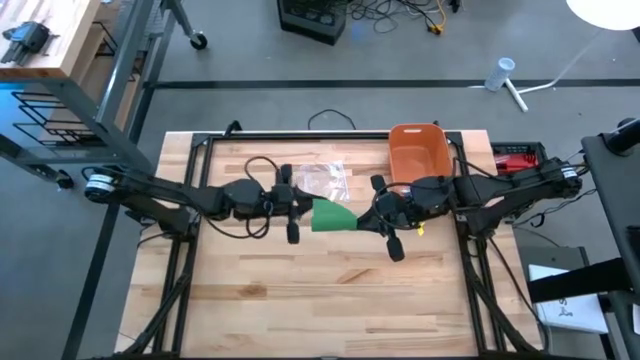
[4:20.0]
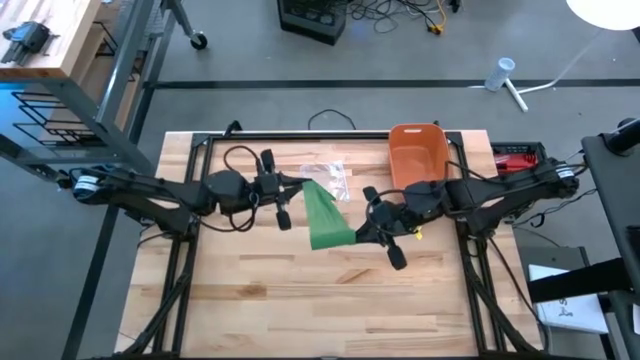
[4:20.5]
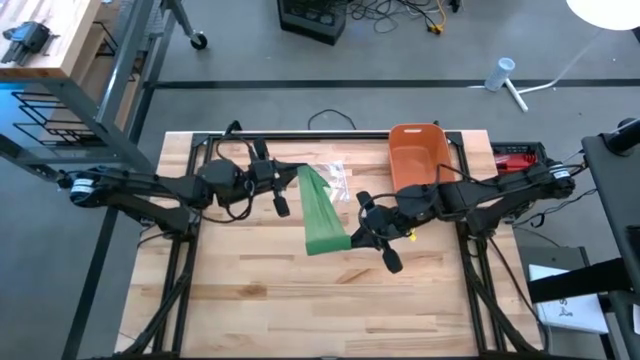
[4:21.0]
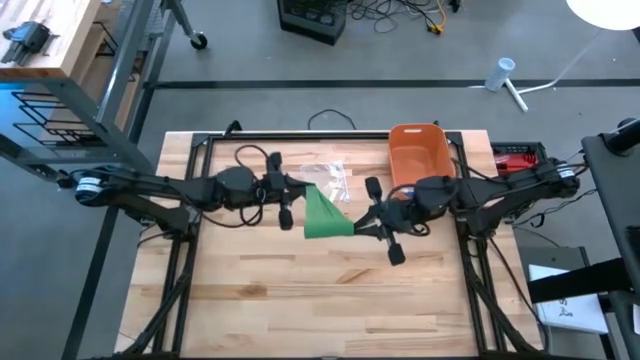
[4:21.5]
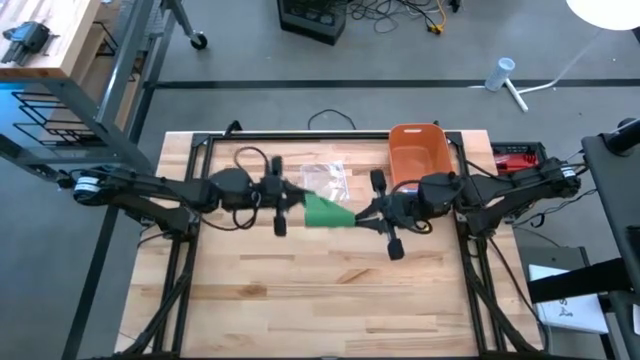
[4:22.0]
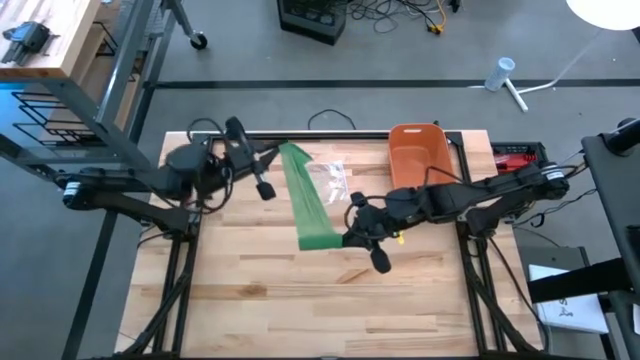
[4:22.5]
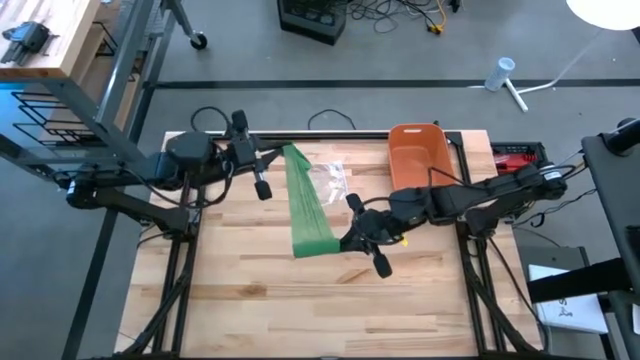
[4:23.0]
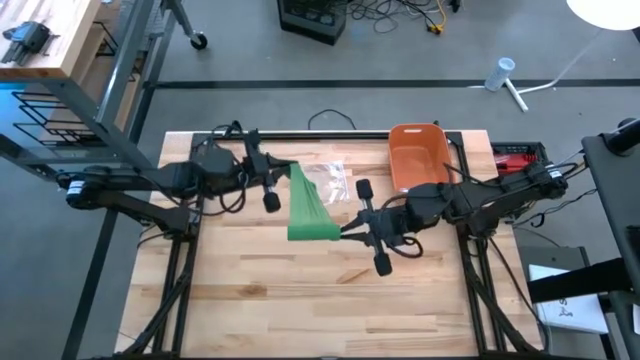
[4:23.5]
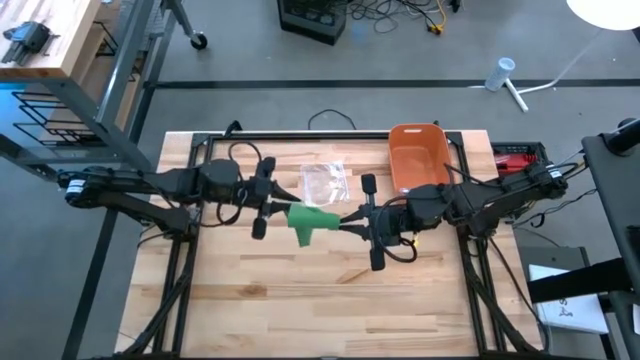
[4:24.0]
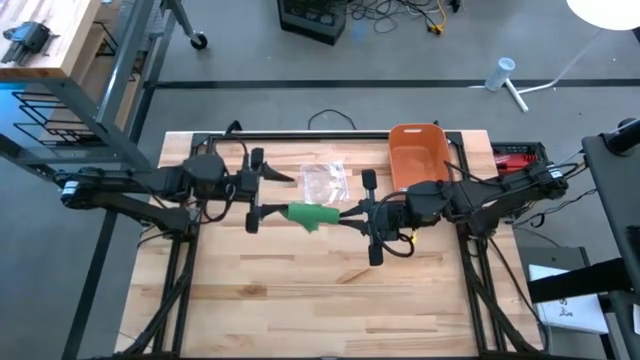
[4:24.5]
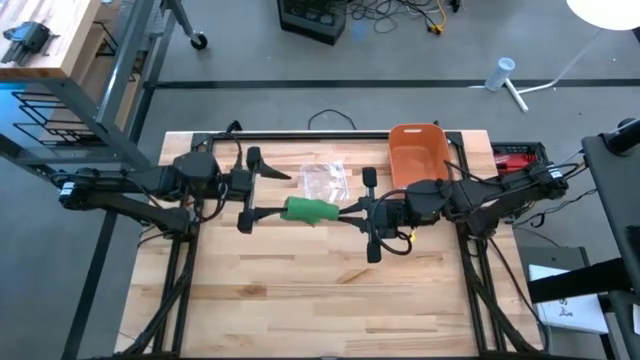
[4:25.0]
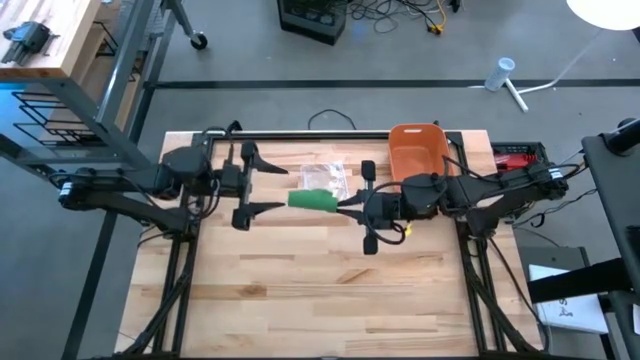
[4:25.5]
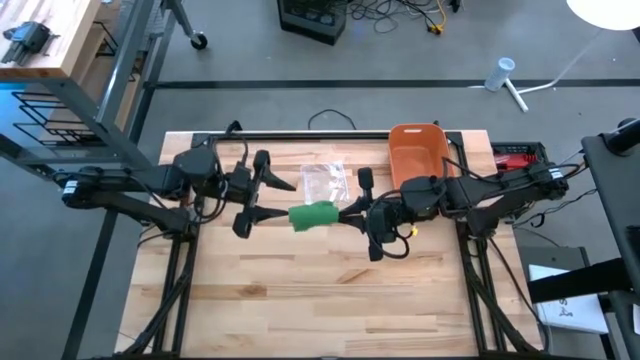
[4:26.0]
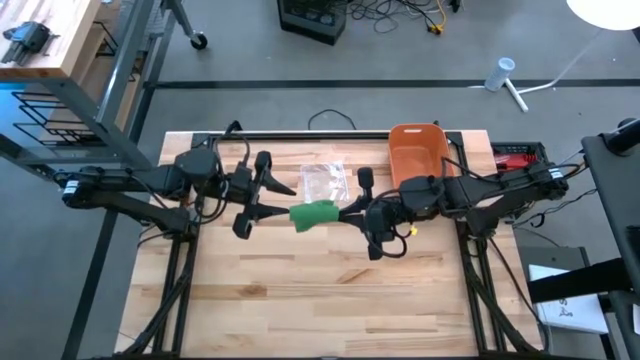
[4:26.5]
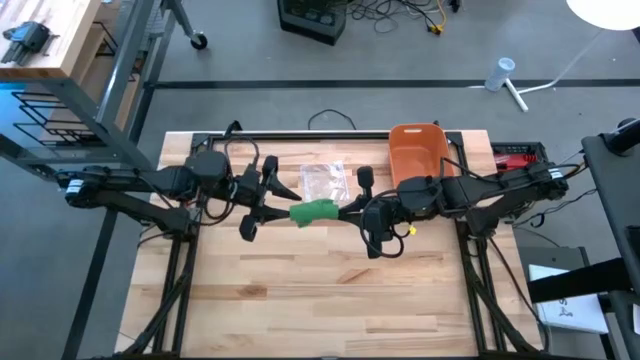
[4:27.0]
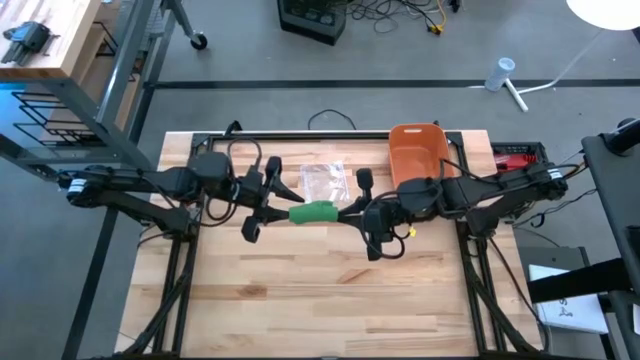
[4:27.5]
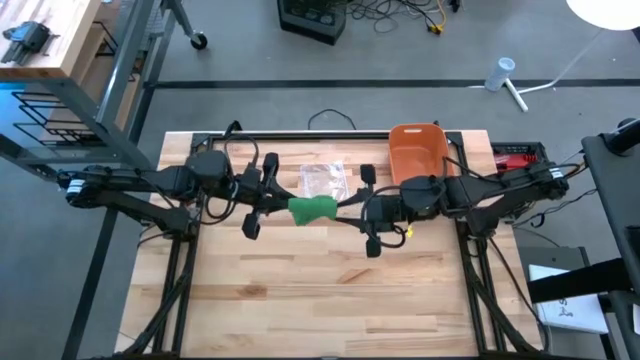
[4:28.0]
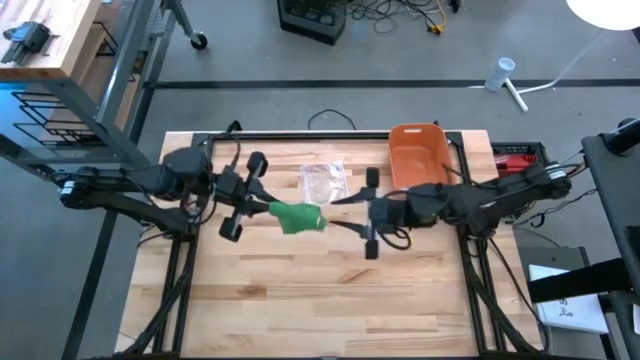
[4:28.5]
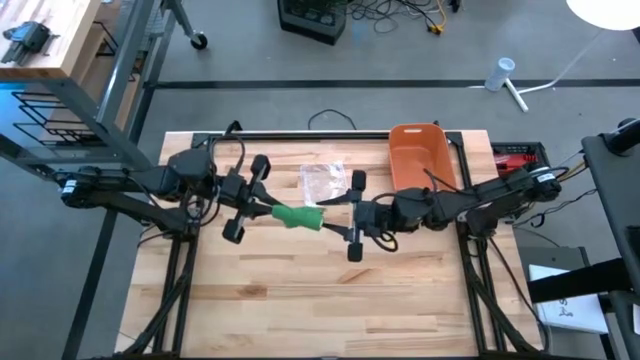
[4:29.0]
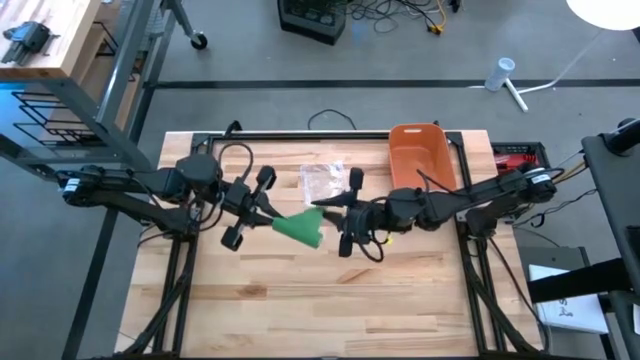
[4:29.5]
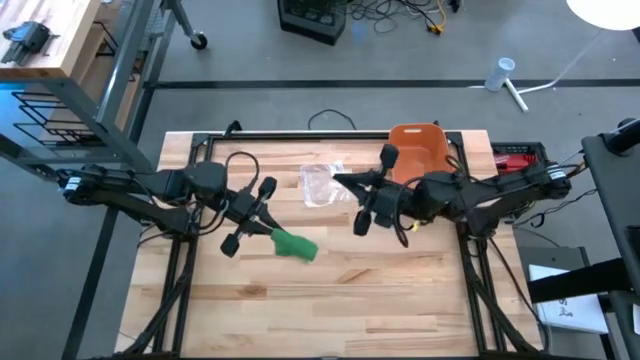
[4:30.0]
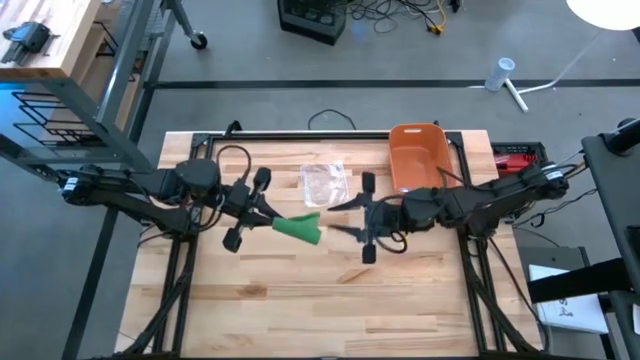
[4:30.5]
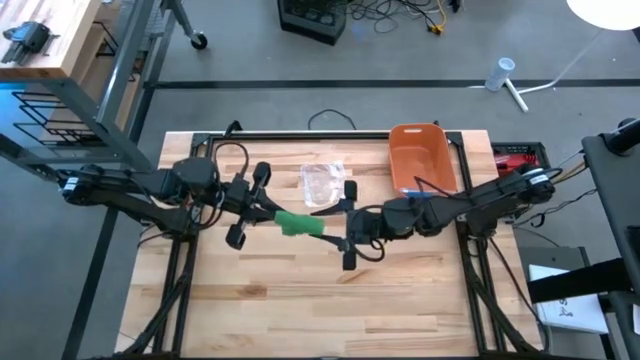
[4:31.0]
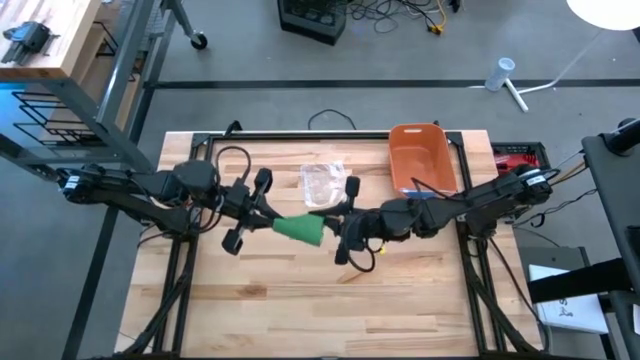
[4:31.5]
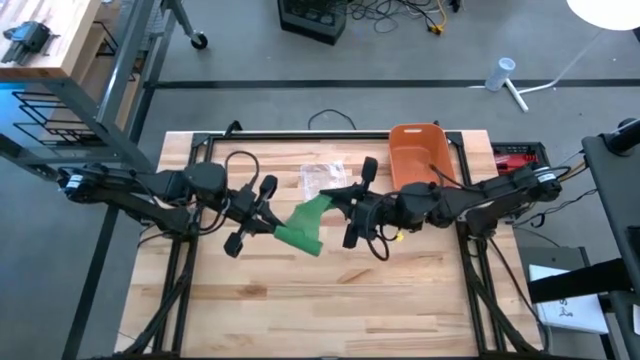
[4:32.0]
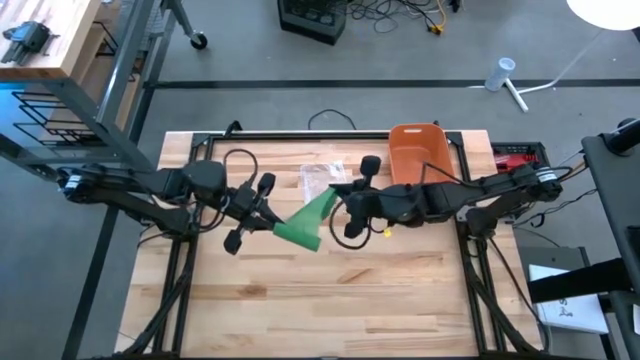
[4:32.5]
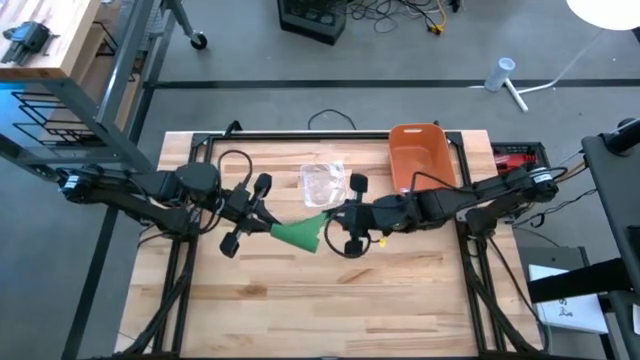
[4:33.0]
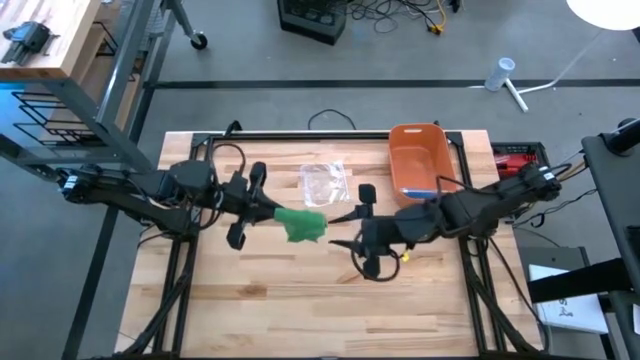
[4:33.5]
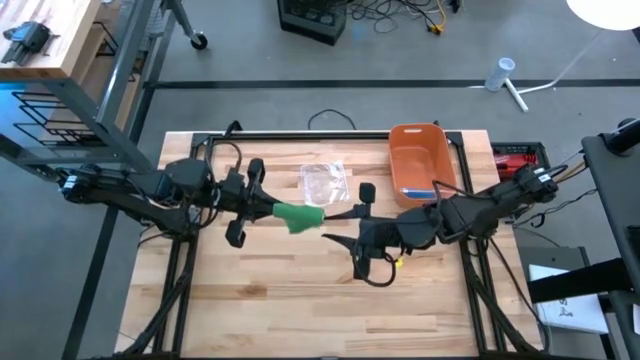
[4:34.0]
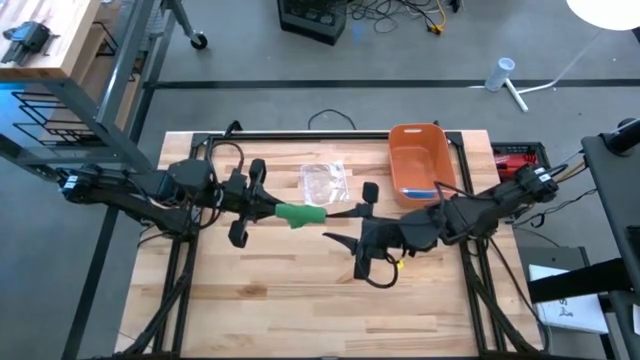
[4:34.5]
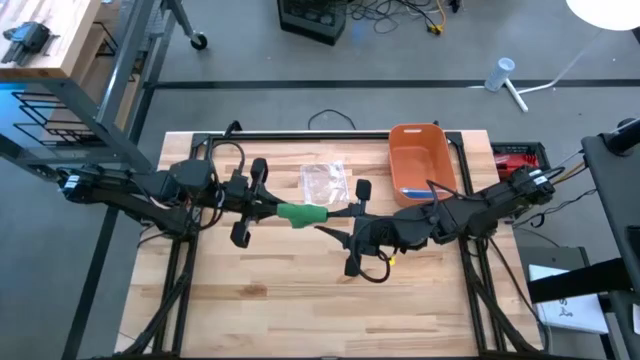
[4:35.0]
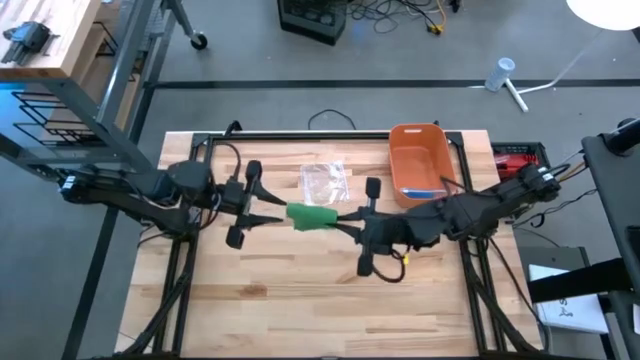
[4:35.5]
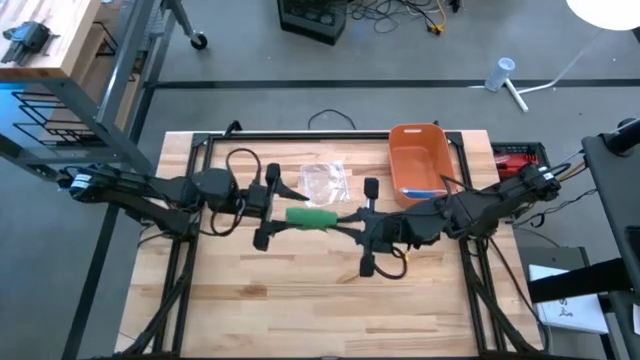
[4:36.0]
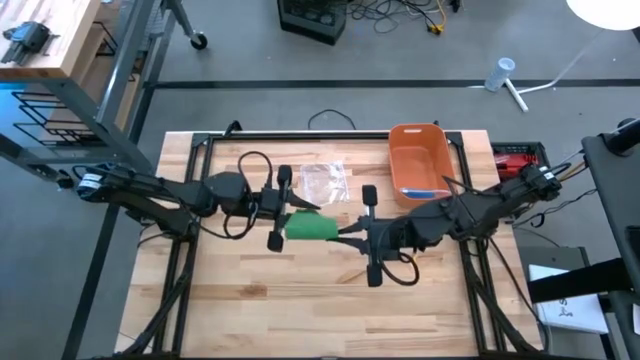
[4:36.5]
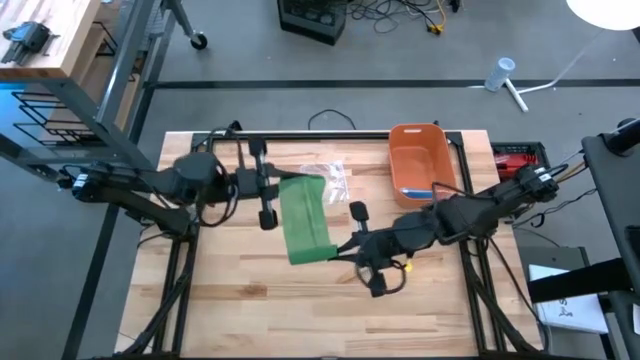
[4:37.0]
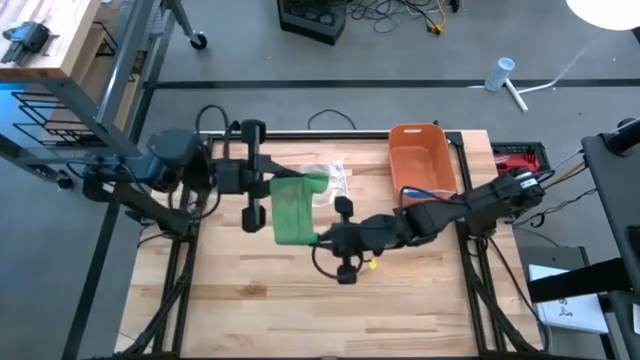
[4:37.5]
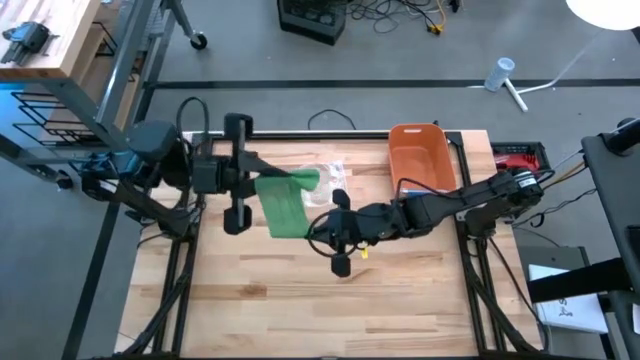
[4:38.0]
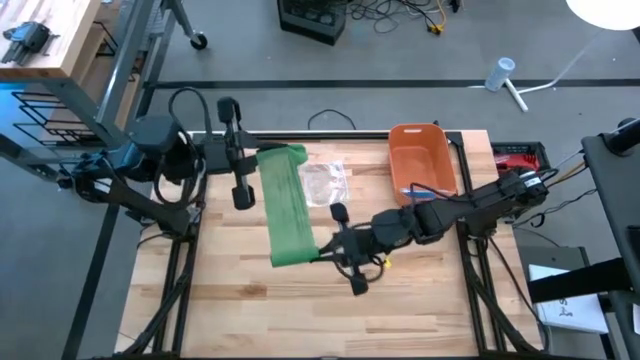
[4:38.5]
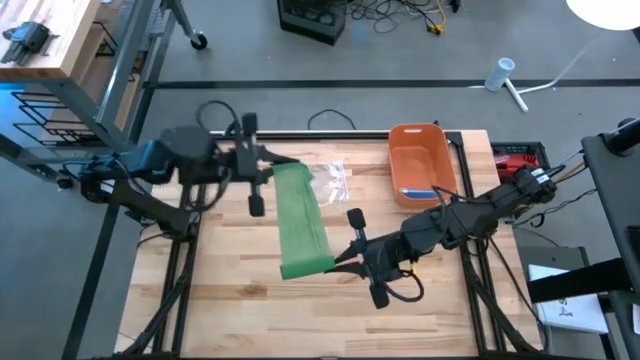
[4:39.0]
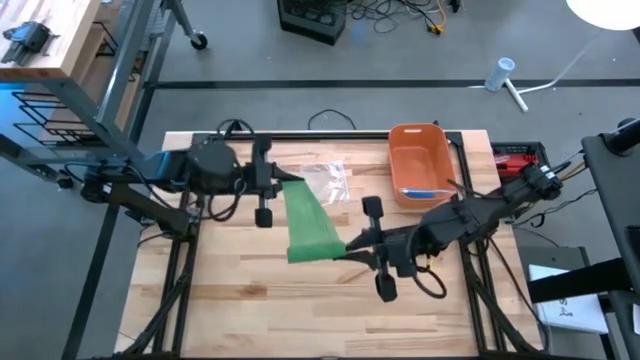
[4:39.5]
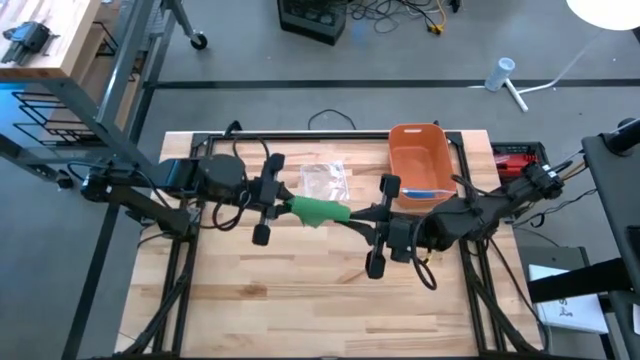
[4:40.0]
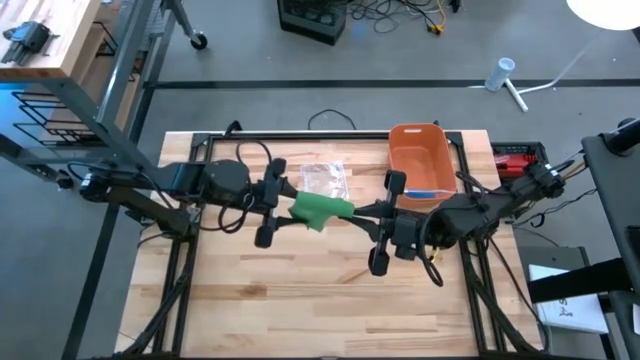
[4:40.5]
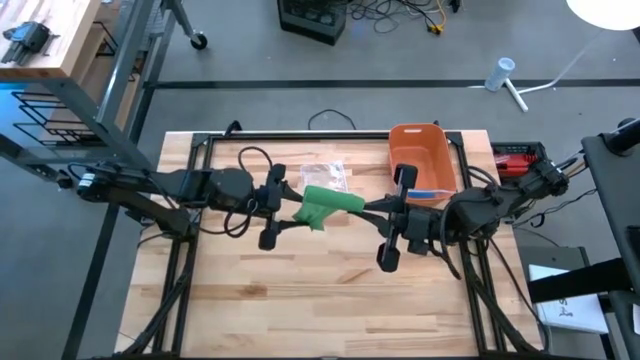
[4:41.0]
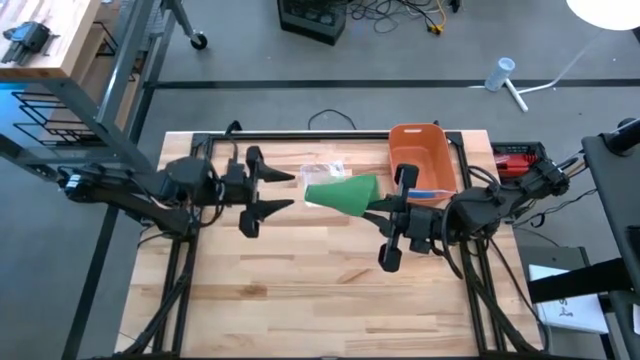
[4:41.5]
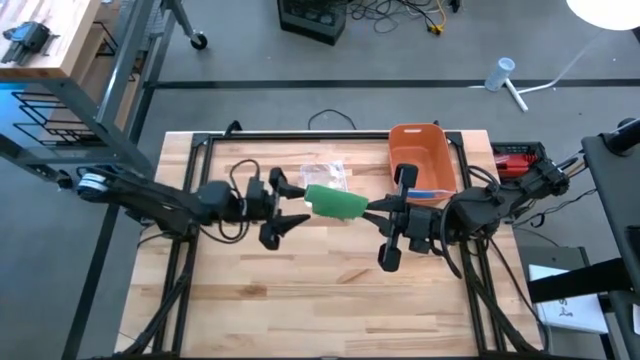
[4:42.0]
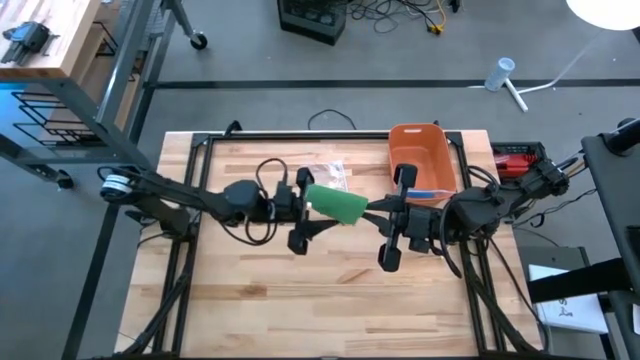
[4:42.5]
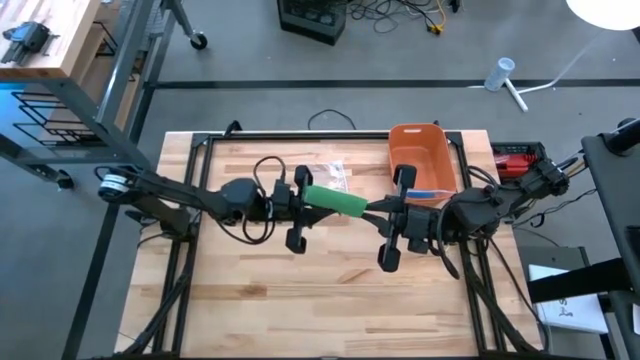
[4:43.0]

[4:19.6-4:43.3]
Task: Roll bandage
Roll the green bandage
